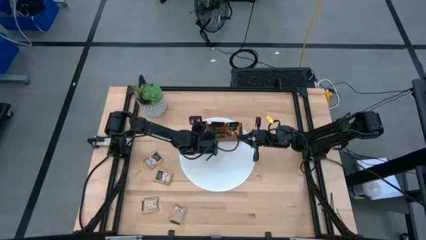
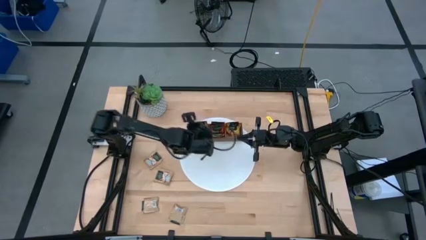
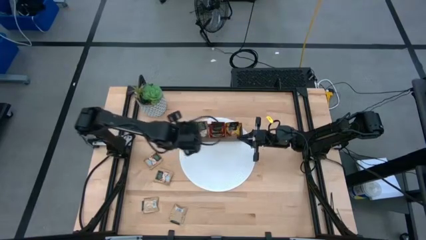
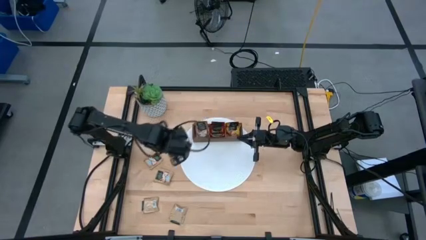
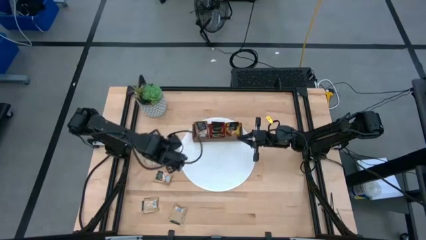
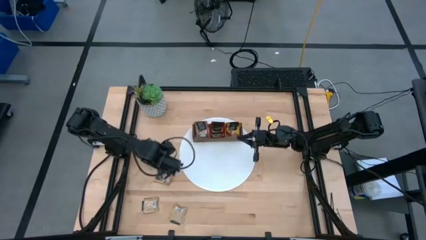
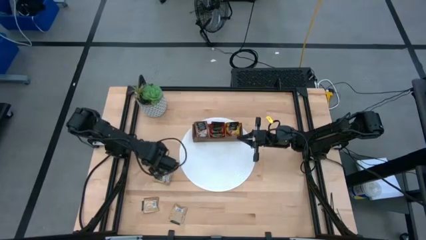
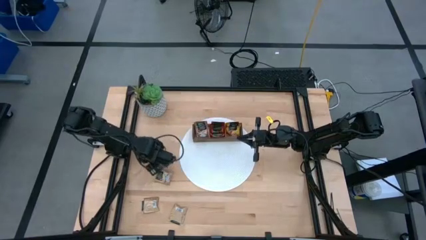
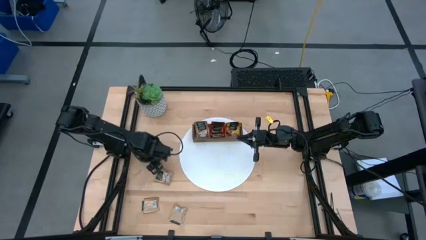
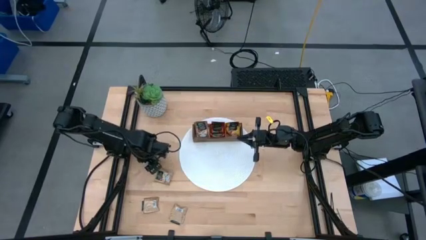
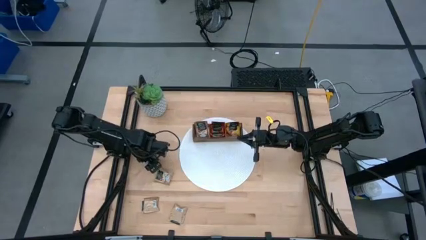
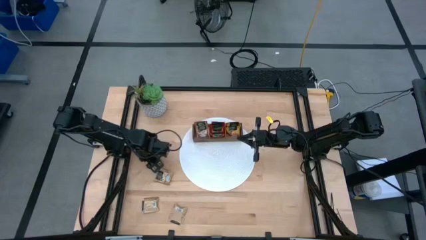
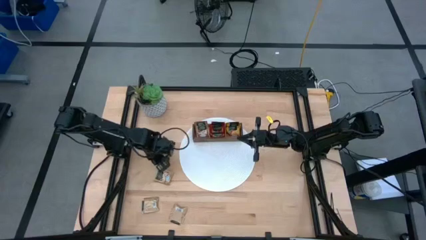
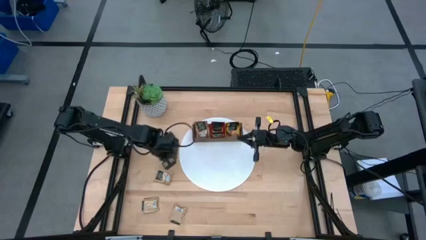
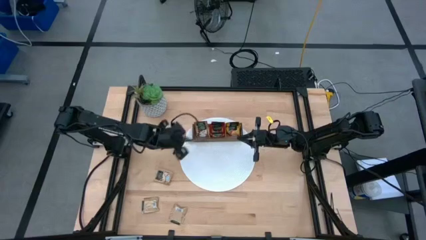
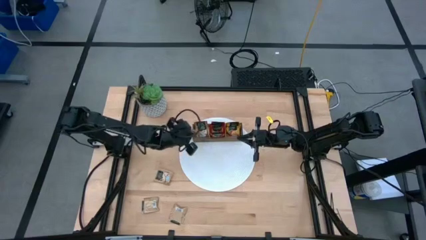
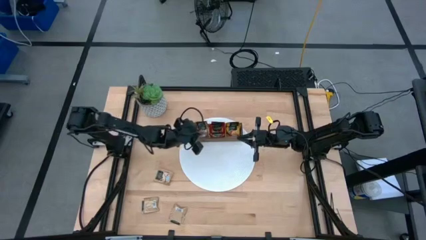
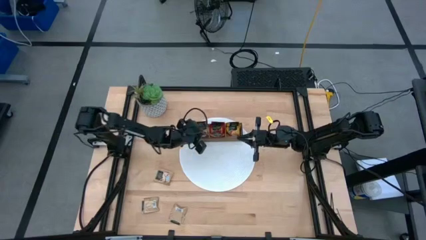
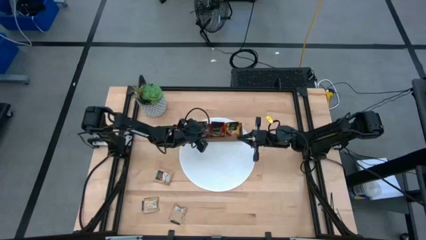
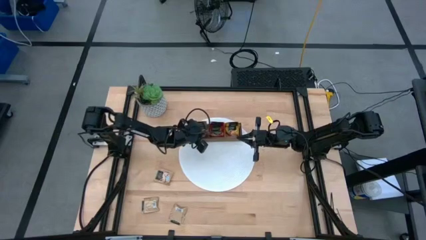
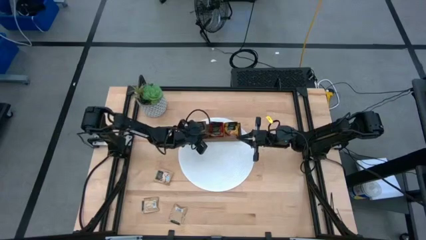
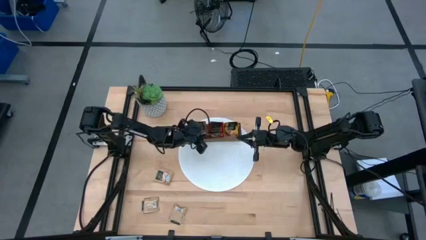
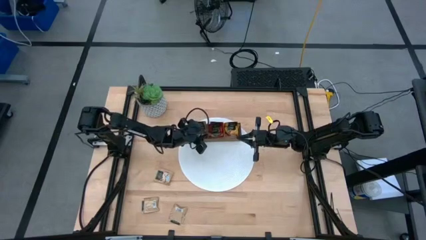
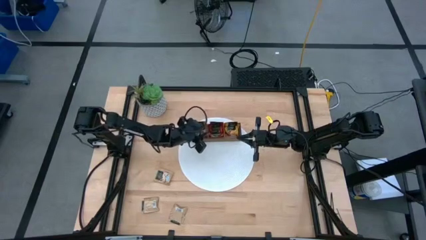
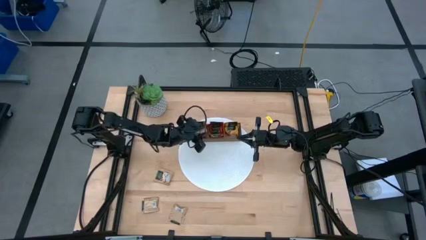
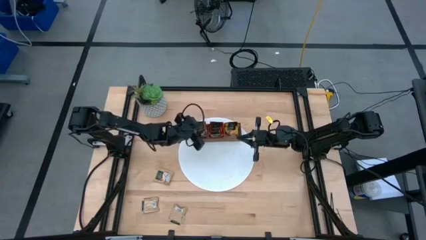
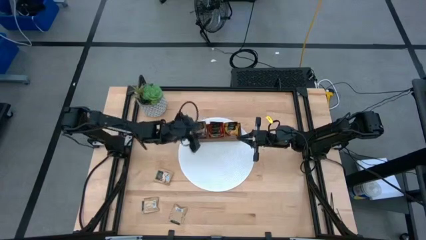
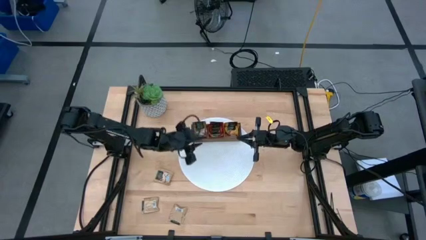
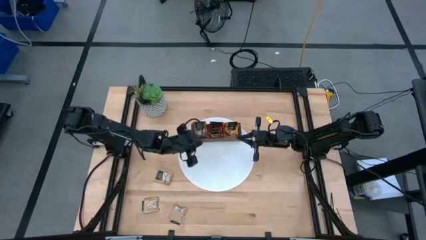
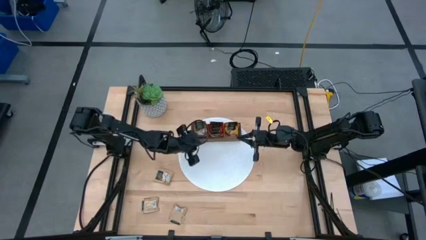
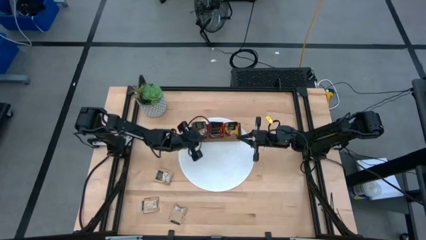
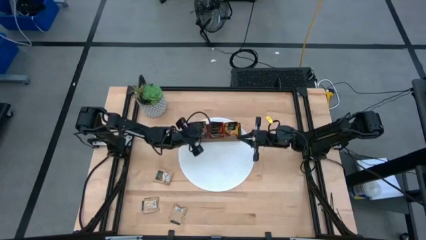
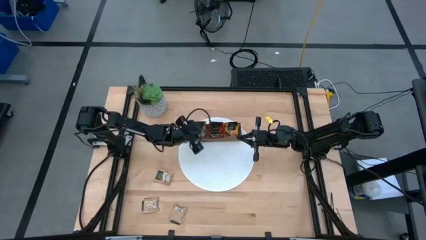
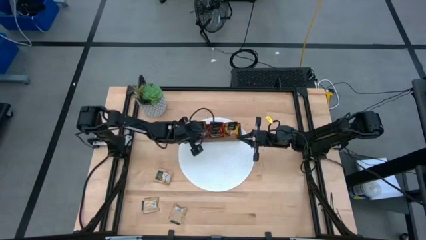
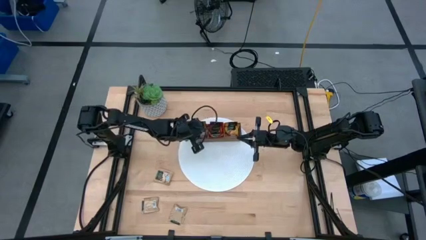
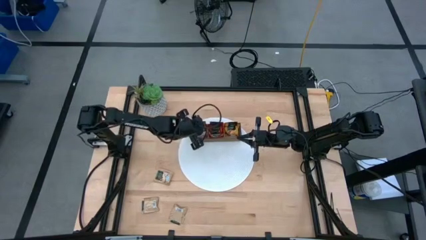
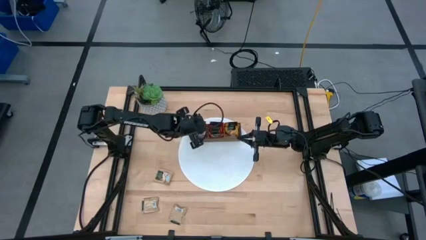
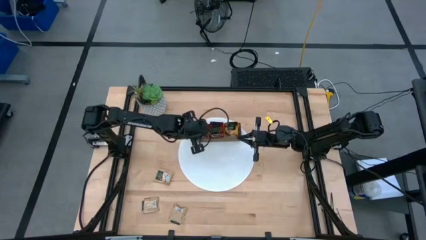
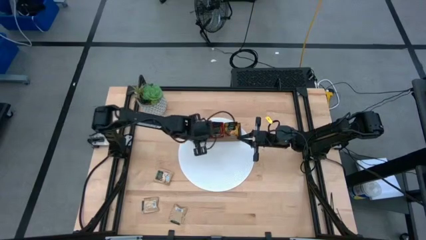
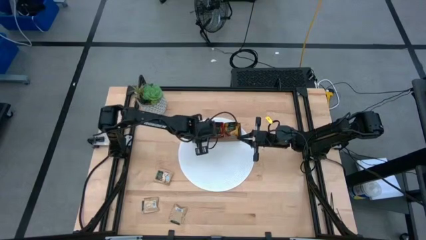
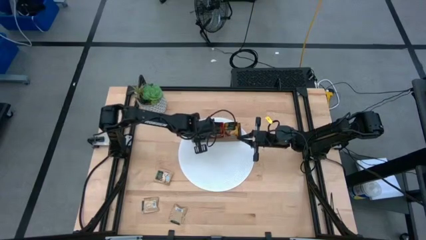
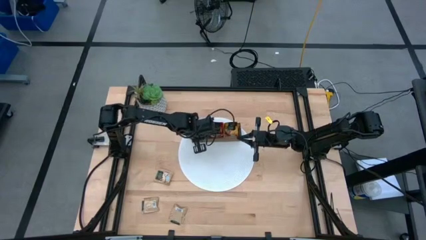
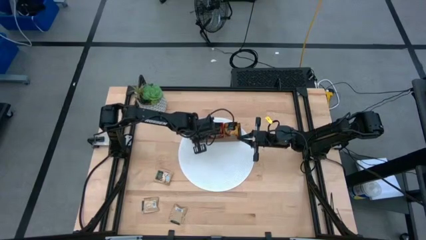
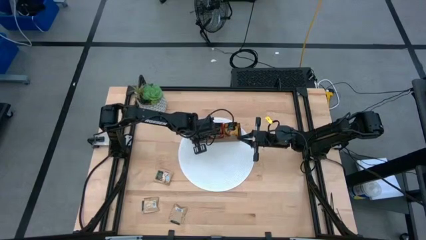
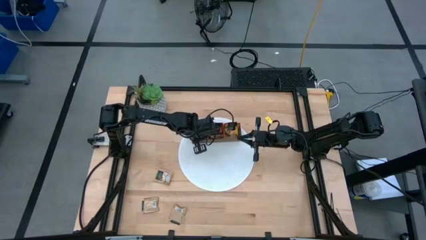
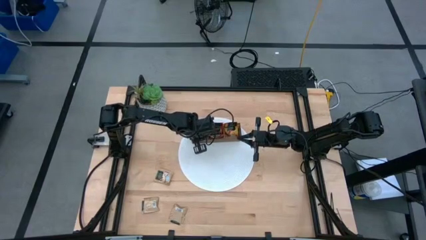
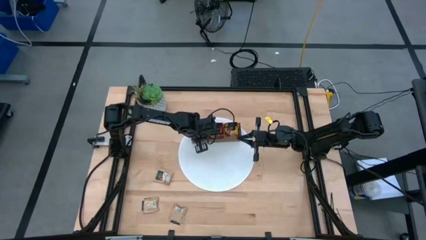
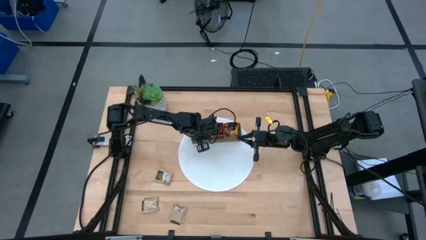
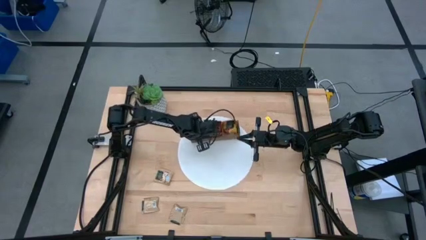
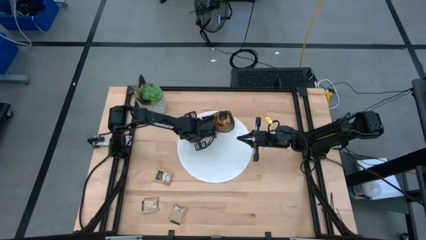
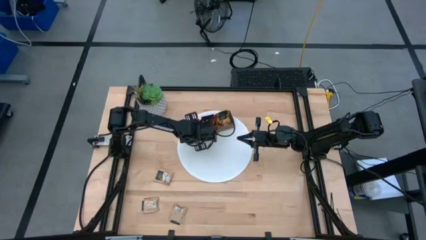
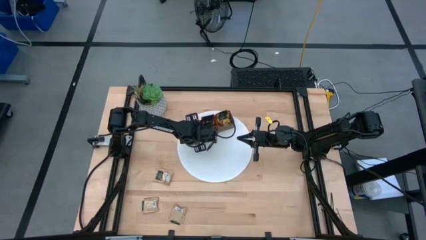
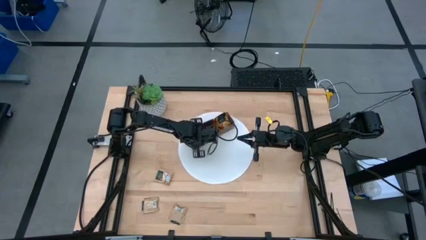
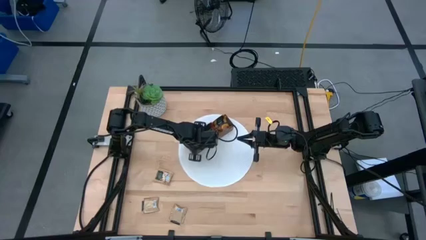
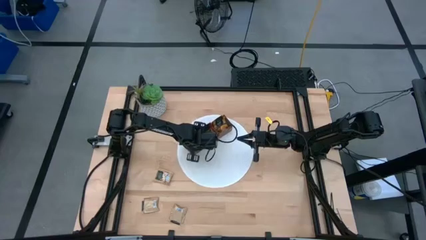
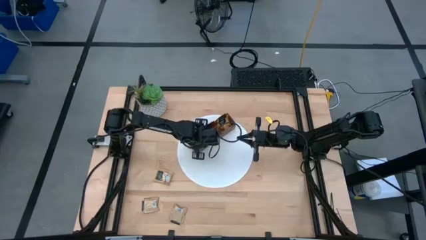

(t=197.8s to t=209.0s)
Task: Pick & Place Tea
Put the brown tea bag into the left section of the wooden organizer

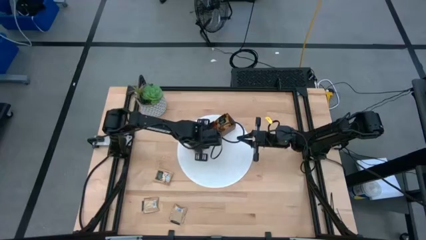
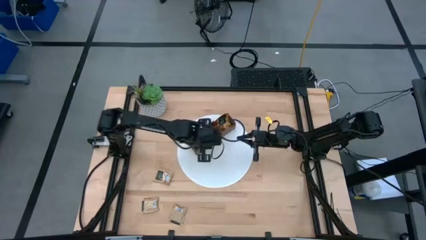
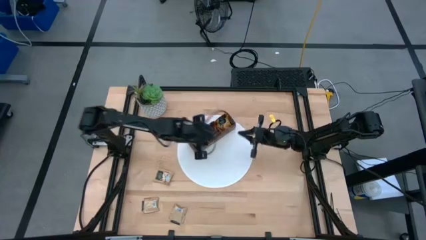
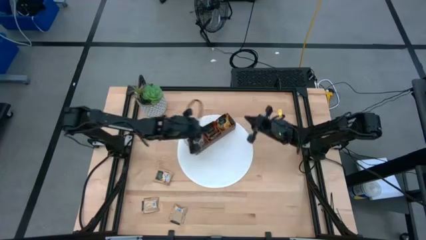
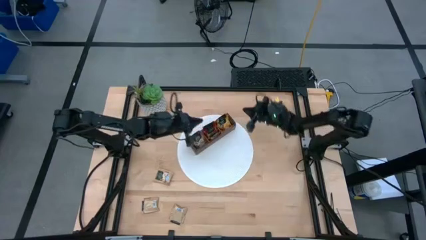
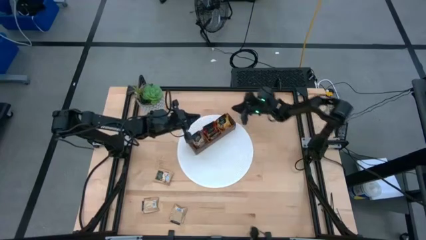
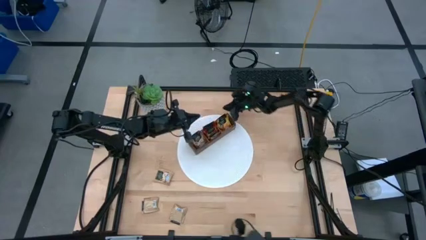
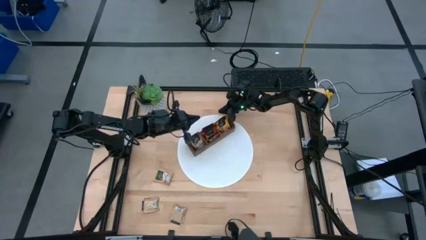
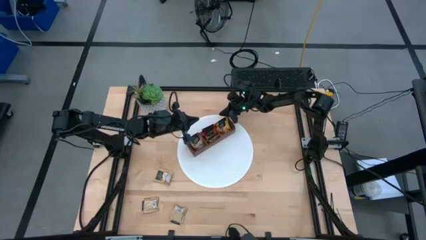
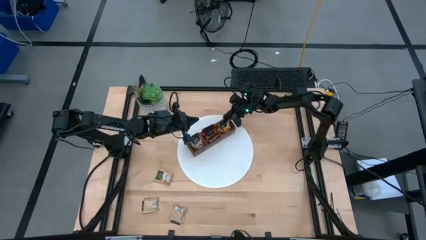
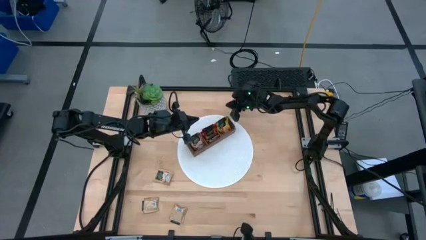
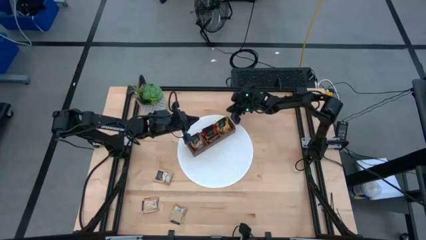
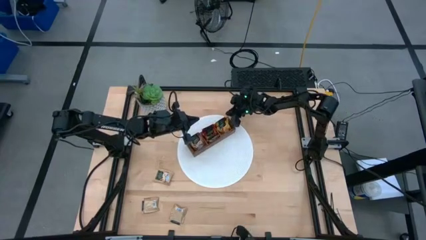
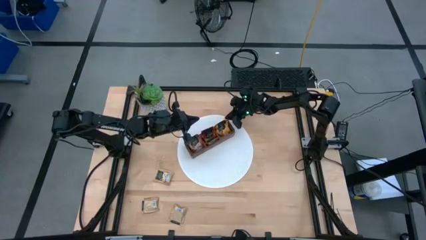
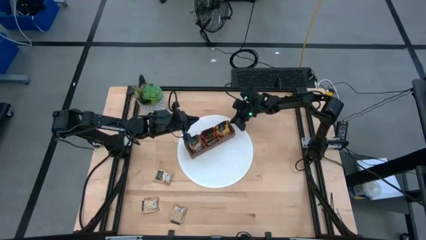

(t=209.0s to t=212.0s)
Adjust the wooden organizer

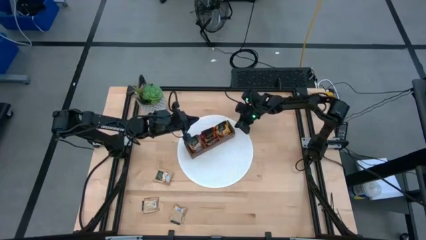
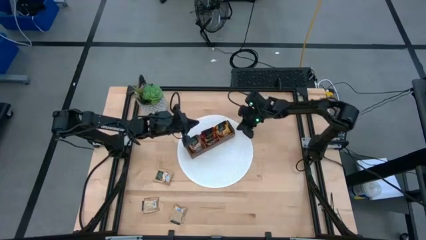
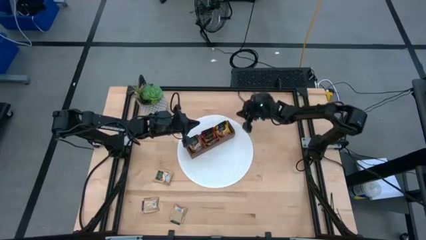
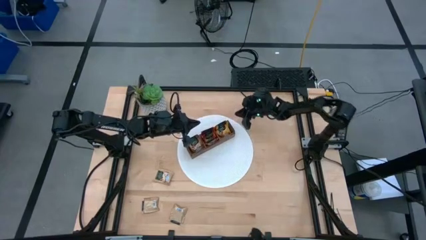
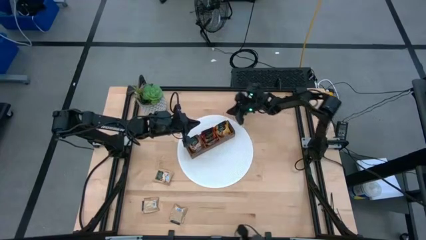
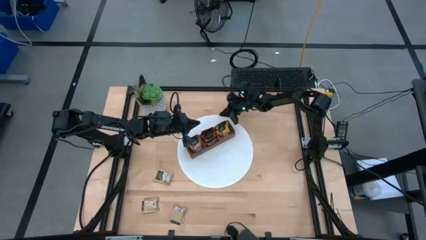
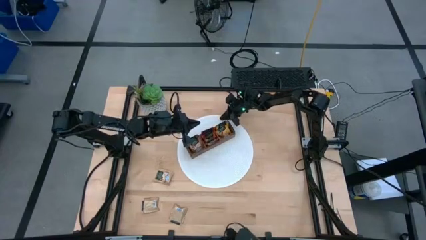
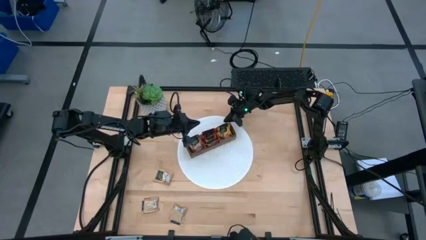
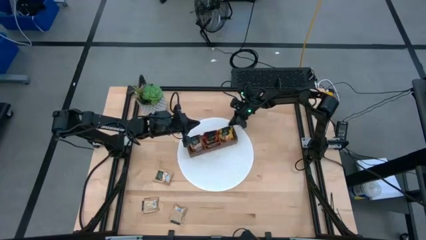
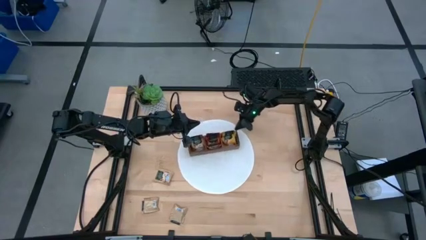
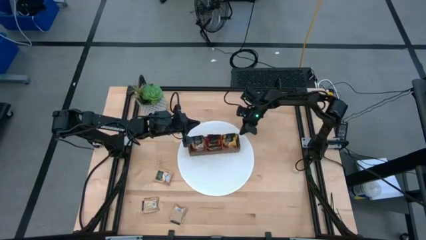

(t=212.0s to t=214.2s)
Adjust the wooden organizer
